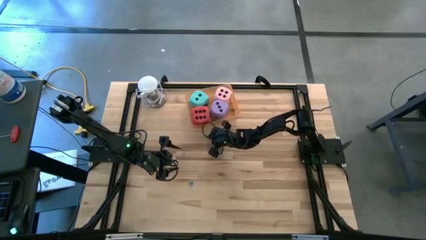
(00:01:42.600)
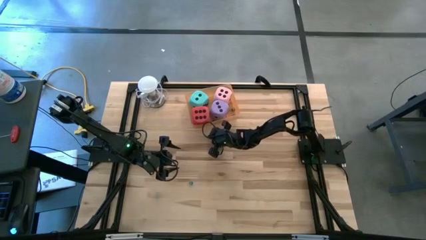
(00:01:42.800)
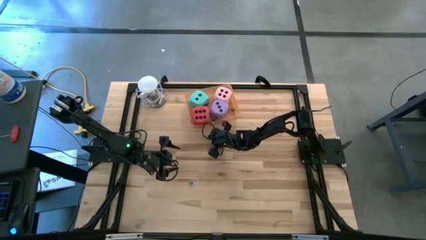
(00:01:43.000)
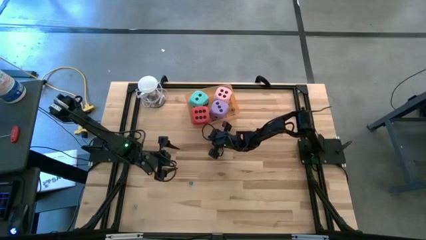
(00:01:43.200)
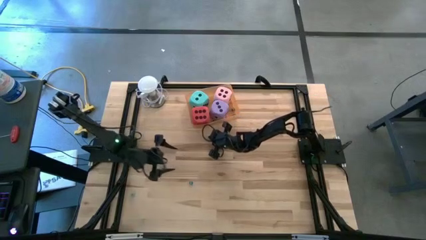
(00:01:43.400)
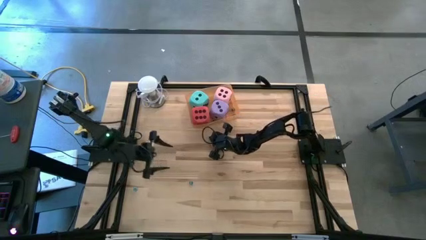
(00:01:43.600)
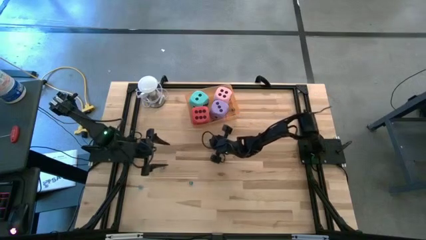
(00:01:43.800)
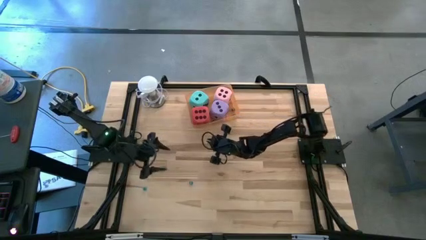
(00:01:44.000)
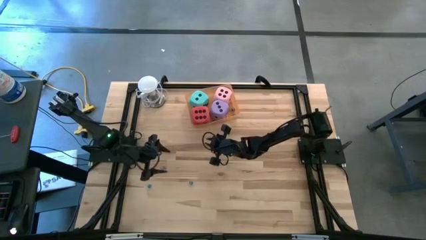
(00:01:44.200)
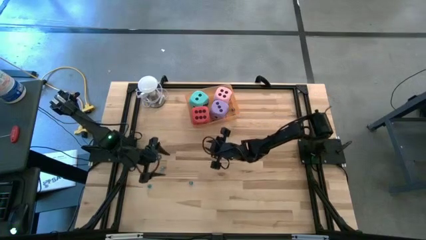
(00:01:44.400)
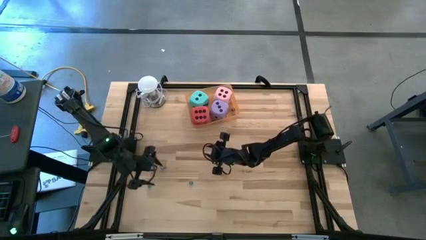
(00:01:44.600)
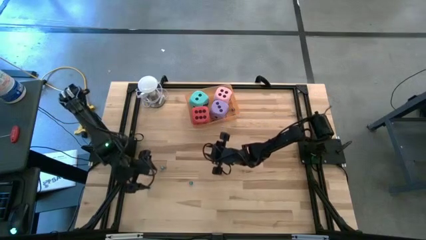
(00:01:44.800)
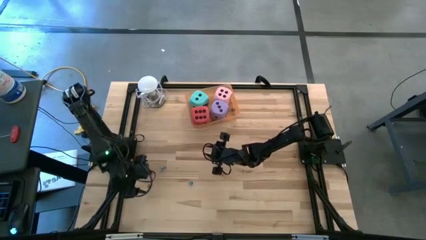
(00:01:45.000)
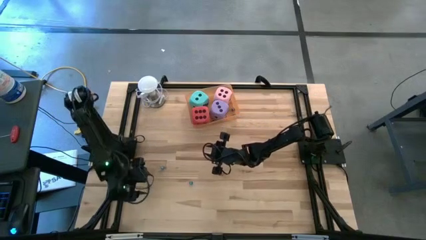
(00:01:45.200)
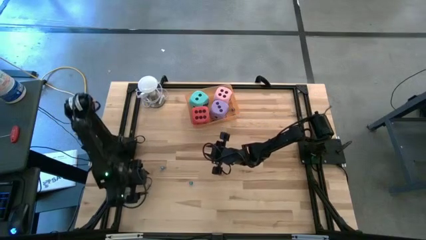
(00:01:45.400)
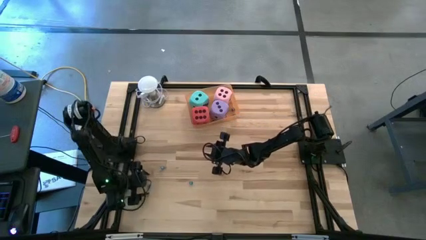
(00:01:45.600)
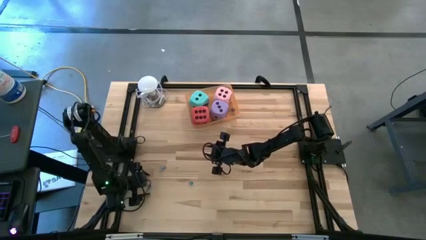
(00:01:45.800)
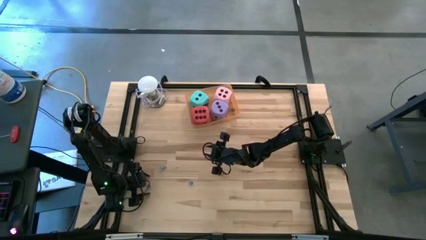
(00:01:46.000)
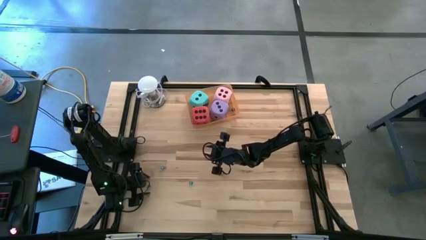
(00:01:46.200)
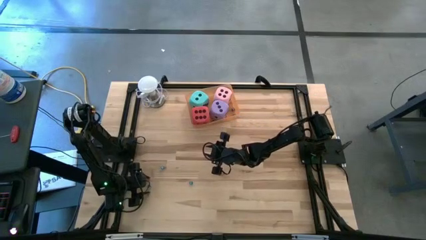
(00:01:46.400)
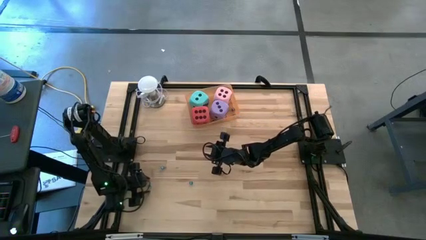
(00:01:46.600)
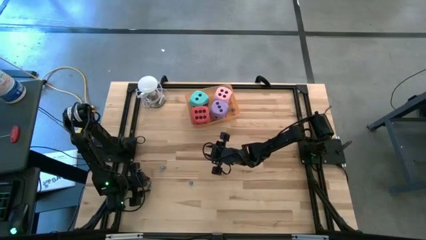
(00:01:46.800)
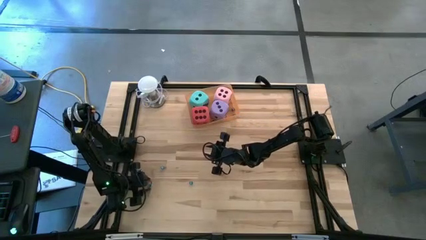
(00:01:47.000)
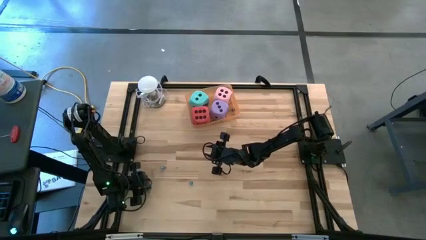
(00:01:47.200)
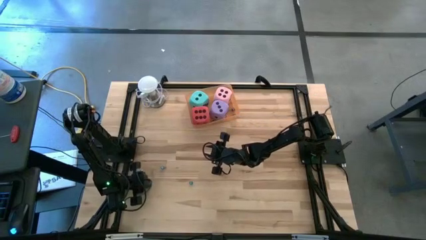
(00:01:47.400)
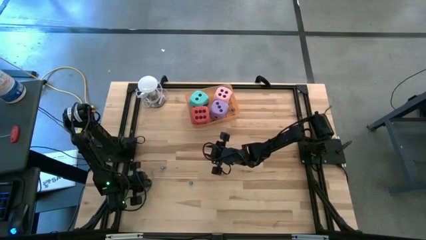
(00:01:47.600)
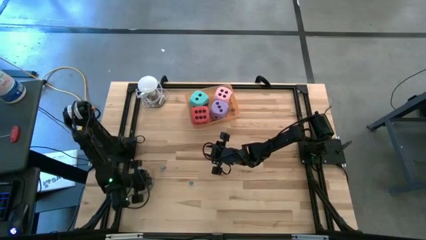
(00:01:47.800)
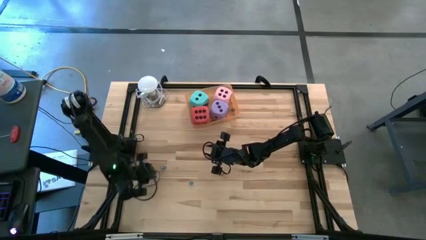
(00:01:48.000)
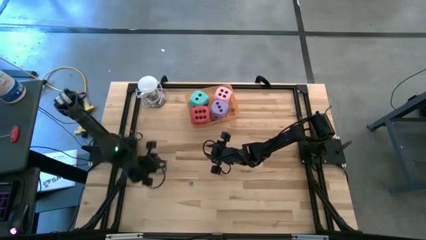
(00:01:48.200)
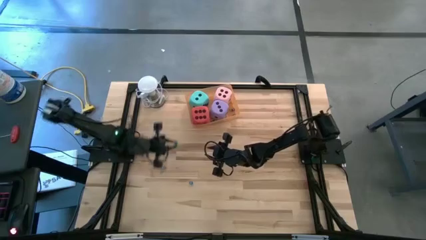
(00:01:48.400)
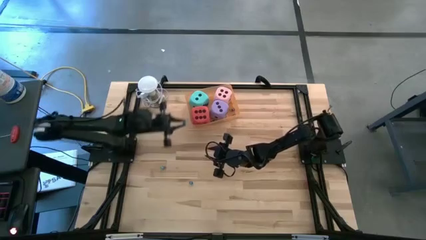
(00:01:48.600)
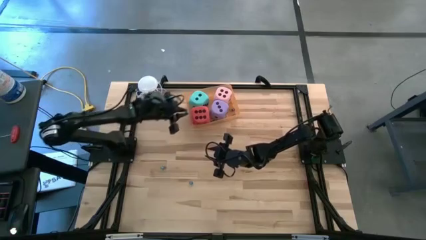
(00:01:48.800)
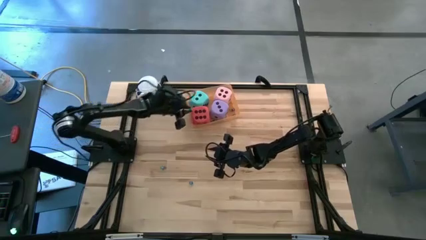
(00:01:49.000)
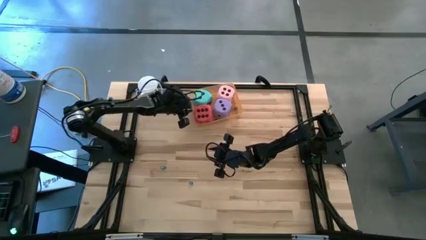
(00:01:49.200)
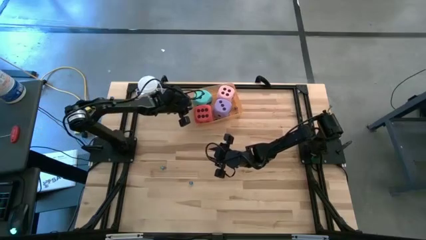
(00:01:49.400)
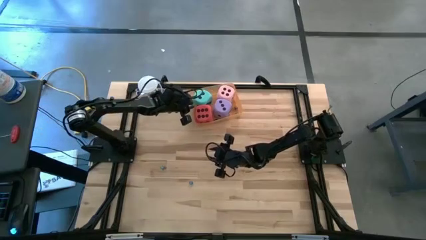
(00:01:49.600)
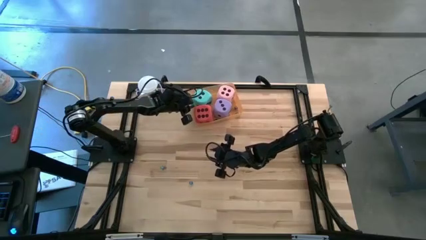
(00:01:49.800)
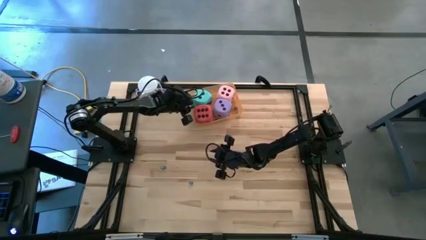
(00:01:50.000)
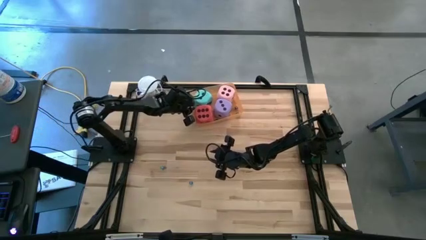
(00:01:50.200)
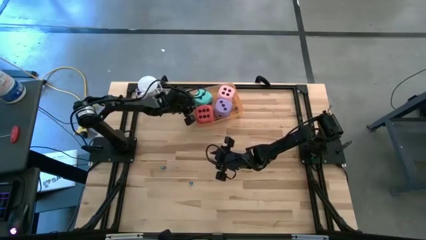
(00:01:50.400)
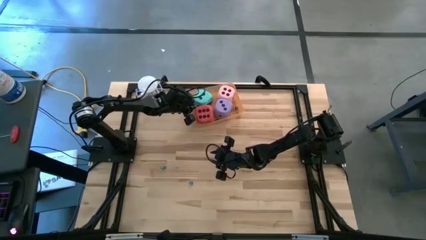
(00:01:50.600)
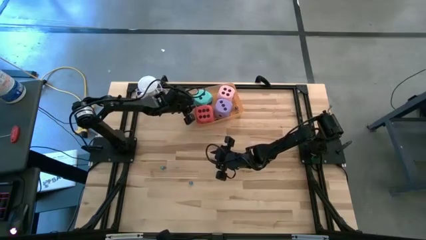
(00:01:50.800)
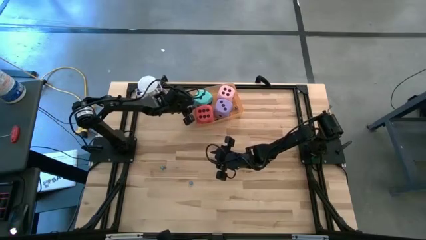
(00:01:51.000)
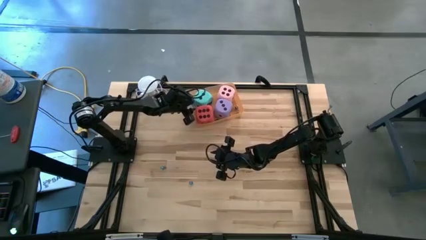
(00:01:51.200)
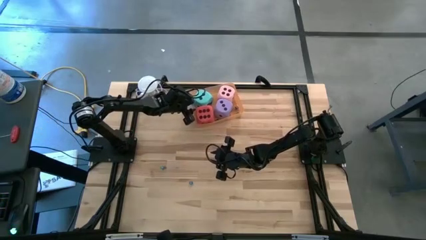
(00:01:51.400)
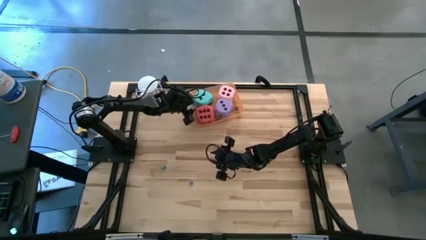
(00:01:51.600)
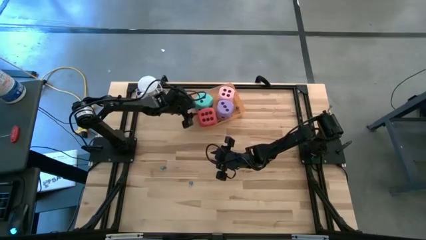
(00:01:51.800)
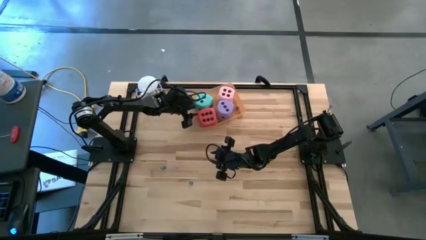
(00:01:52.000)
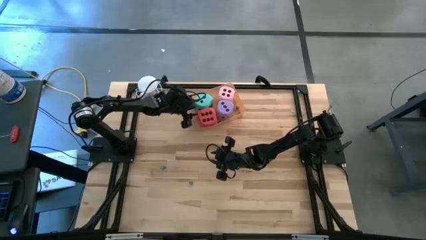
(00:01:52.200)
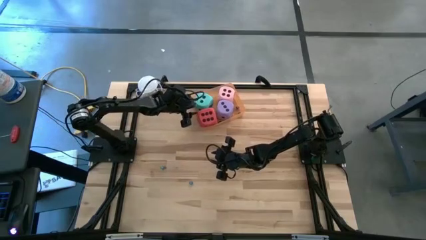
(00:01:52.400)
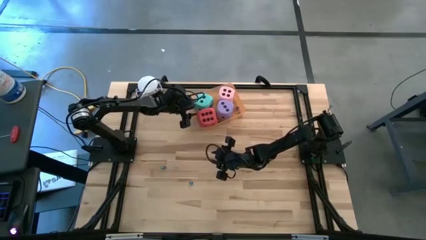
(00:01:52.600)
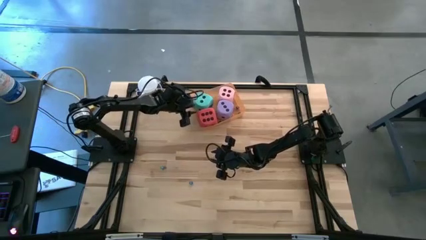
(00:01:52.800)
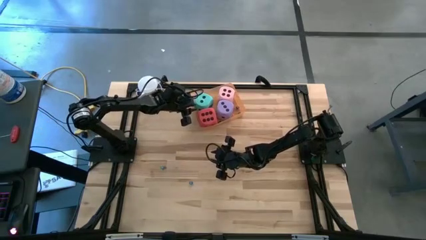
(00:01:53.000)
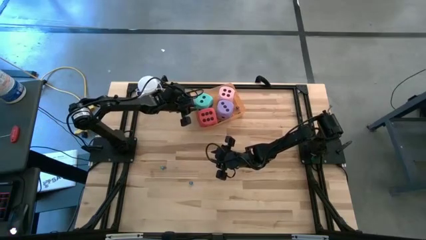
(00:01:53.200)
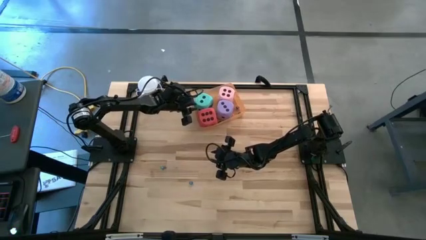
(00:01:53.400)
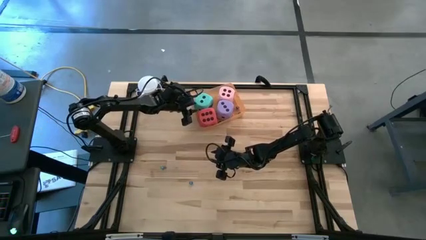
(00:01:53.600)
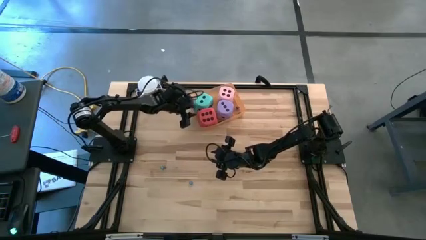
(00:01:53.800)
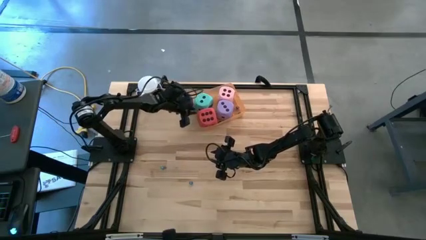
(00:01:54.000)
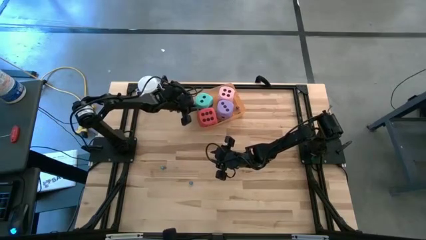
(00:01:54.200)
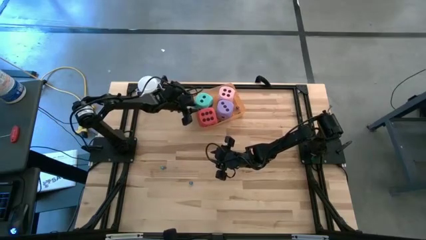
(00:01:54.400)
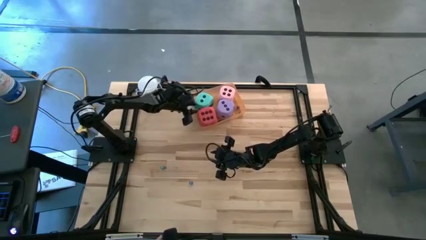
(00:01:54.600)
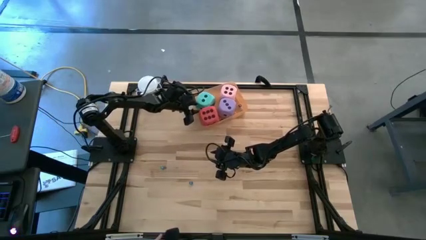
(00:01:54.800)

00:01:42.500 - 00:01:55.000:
Task: Pick & Place Dice
Put the left light blue die into the bin

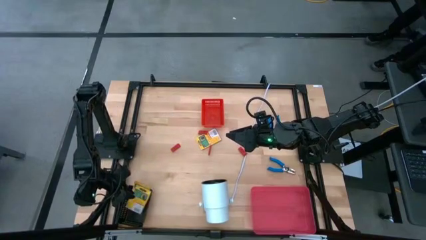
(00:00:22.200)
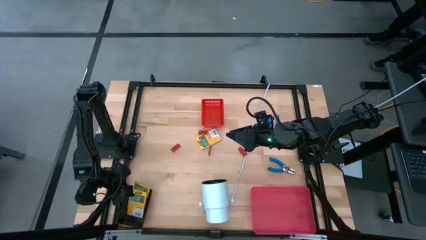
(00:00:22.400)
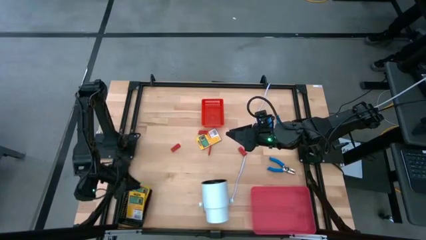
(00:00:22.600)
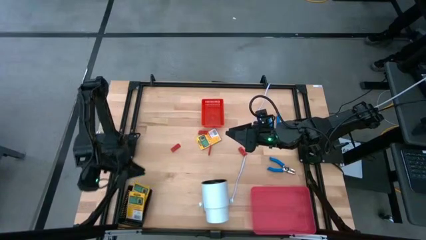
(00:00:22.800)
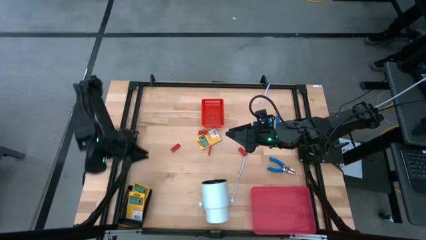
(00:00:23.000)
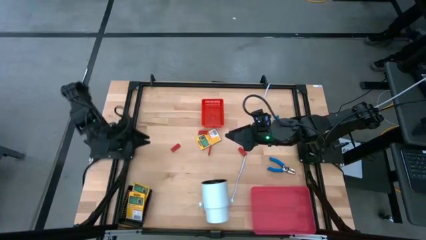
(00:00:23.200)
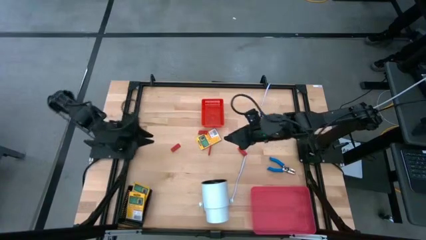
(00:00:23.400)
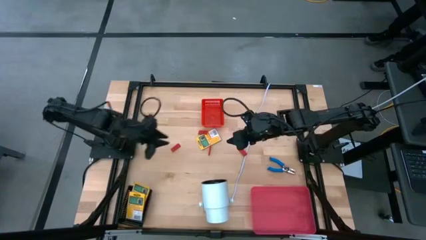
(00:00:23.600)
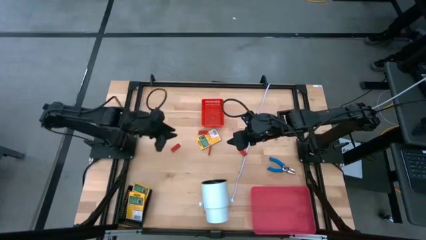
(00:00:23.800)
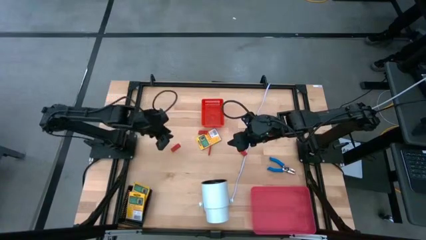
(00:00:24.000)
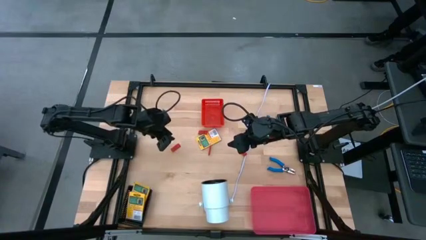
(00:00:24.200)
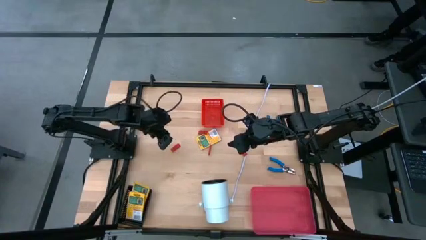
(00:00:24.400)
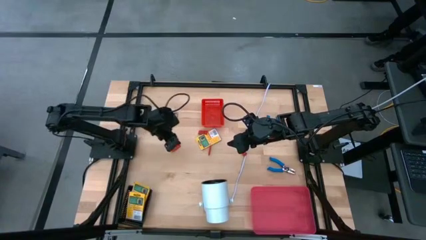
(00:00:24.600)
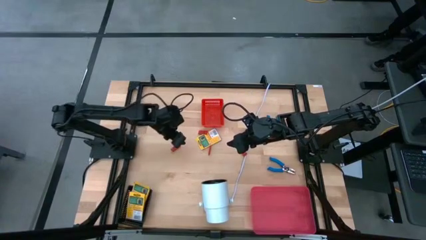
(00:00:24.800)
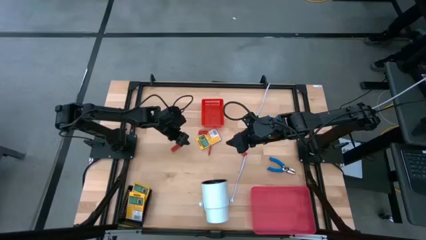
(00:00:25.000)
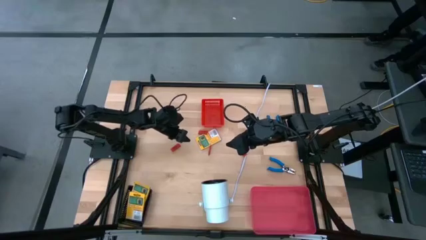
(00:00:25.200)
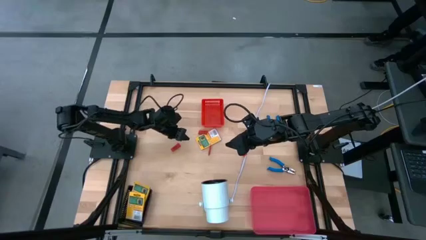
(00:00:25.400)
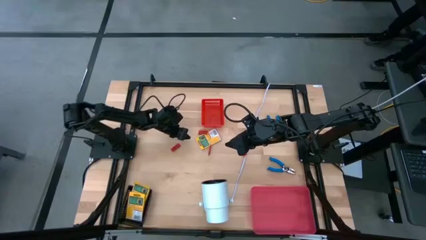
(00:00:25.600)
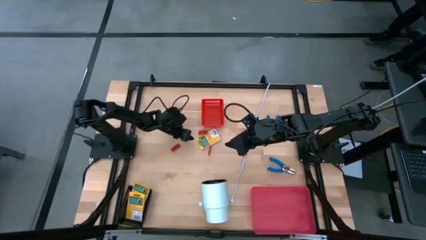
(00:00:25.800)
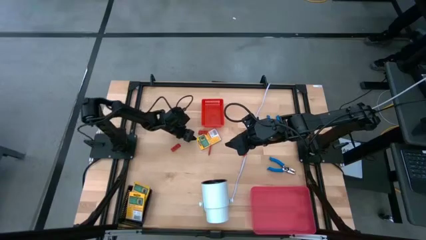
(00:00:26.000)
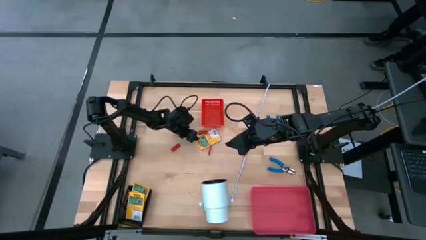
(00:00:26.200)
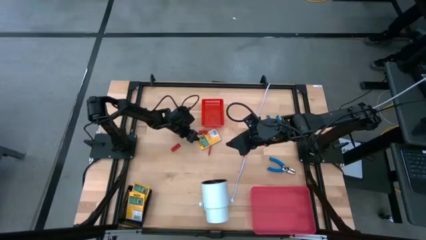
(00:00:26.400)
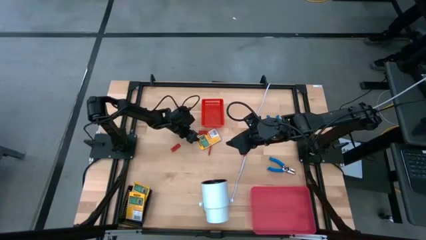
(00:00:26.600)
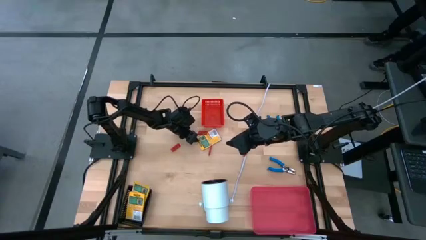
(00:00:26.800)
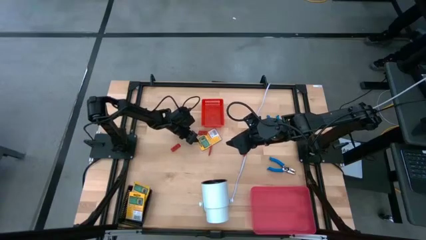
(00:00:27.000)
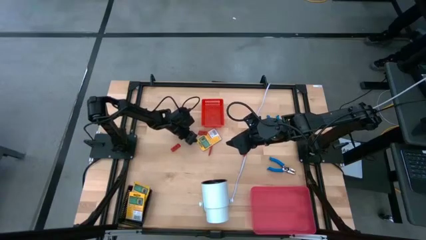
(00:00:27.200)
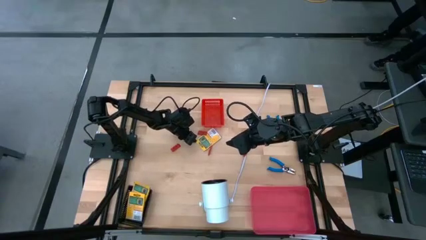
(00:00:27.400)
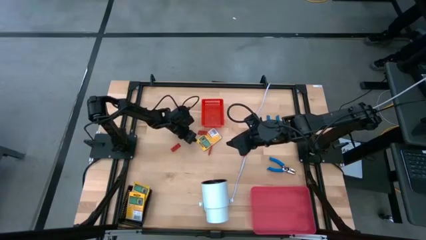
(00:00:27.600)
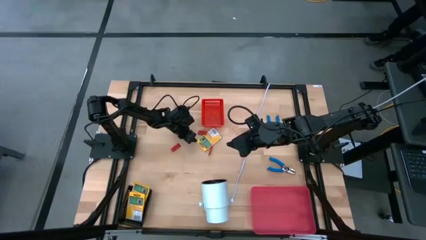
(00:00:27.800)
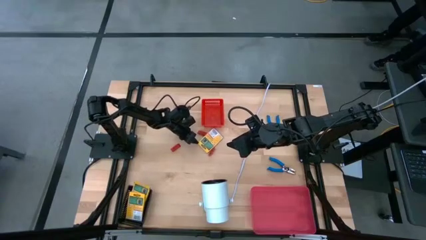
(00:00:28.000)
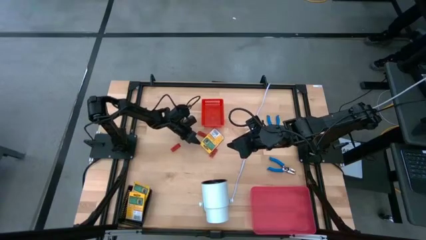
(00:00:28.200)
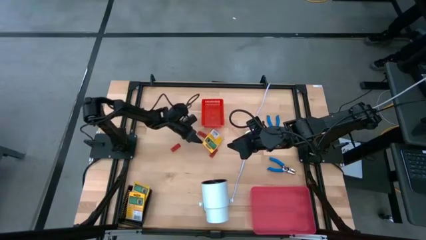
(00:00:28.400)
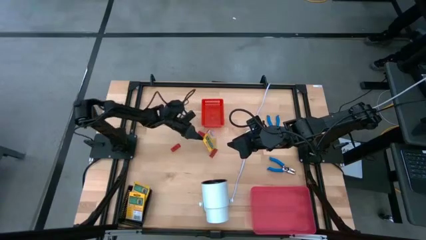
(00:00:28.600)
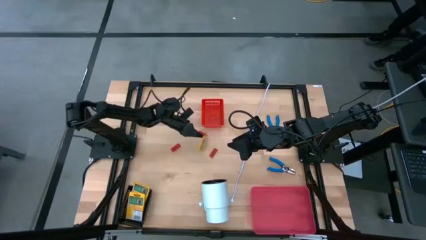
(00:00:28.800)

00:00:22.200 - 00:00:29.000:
Task: Pick & Place School Supplies
Put the yellow box crayon into the black bin
